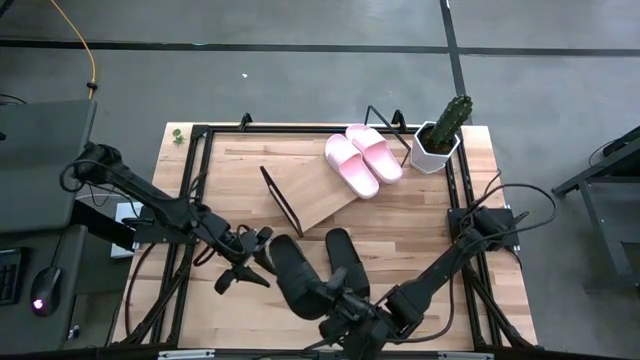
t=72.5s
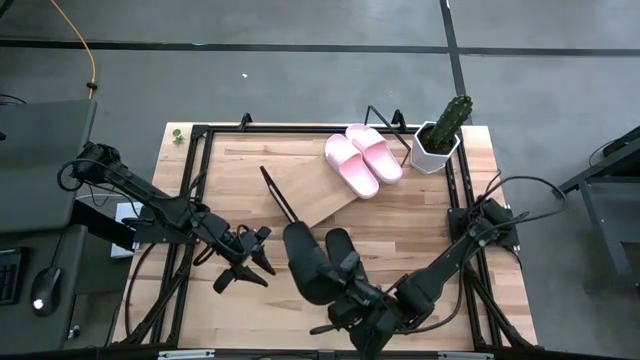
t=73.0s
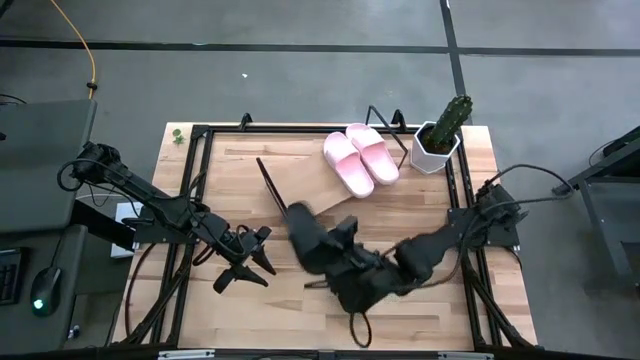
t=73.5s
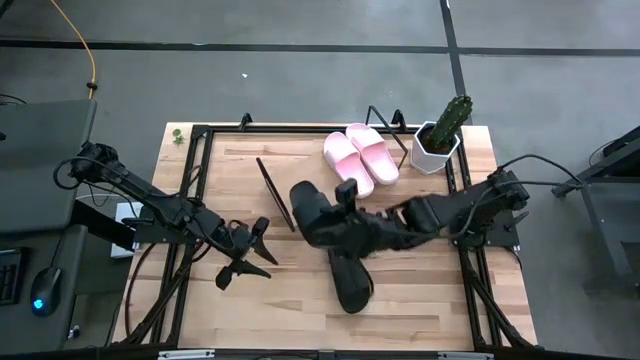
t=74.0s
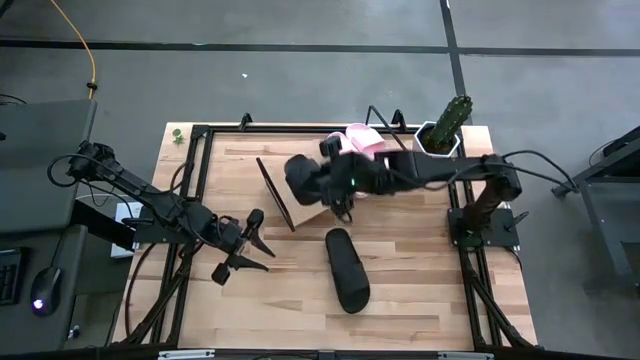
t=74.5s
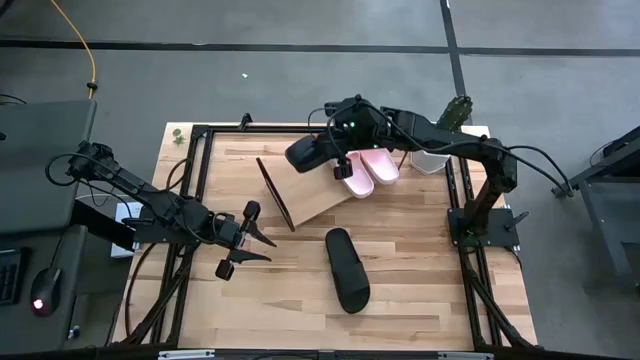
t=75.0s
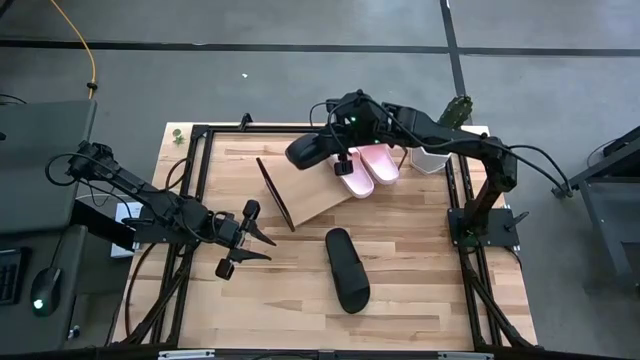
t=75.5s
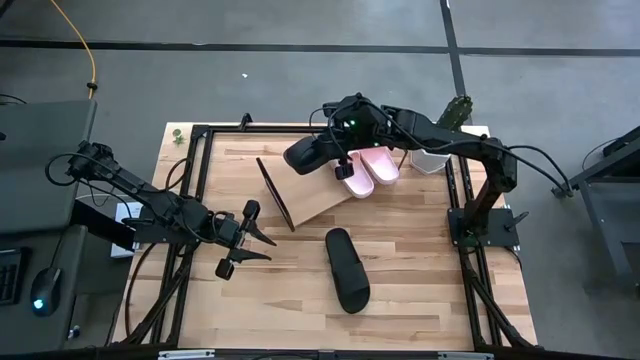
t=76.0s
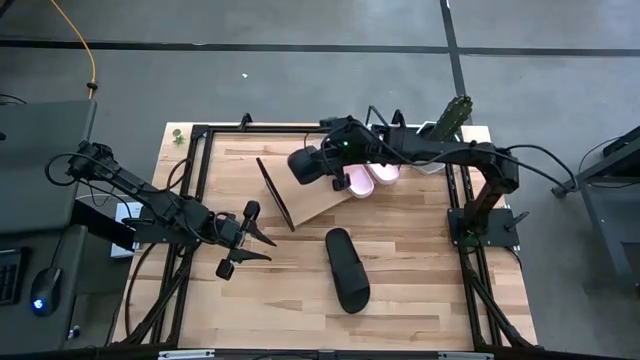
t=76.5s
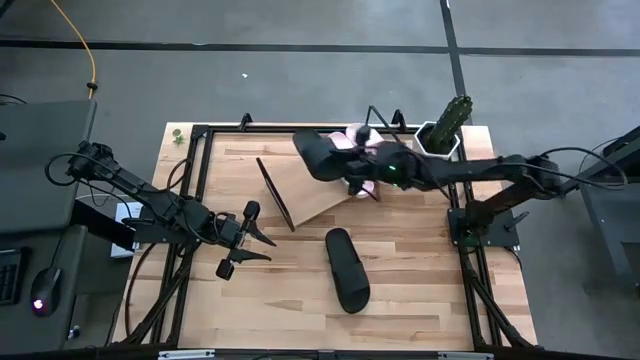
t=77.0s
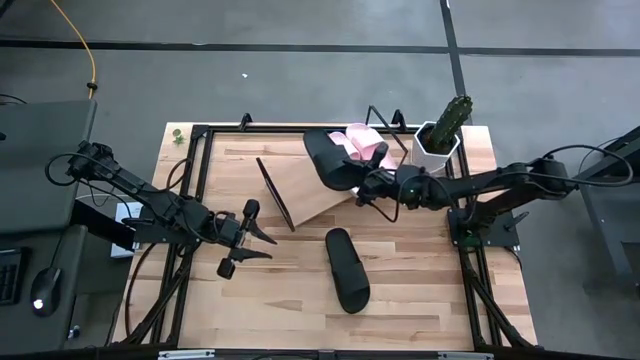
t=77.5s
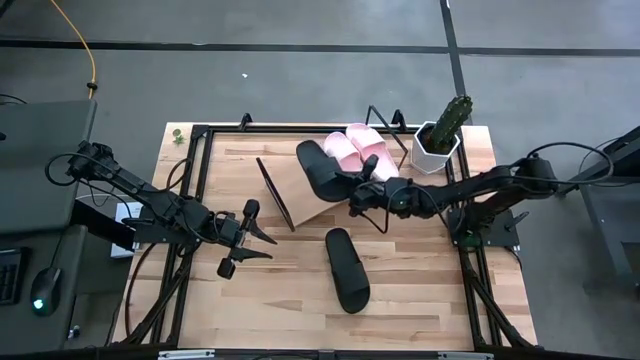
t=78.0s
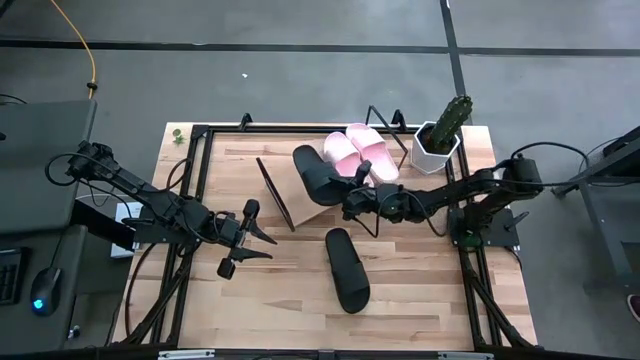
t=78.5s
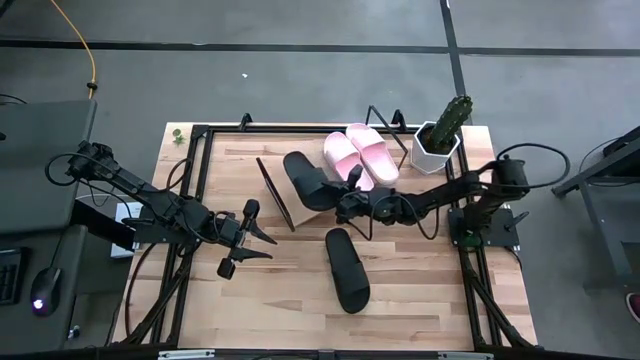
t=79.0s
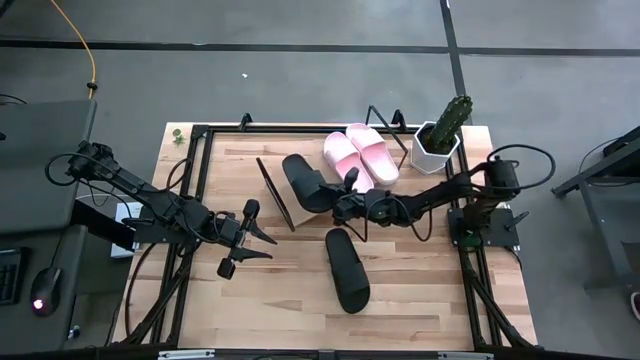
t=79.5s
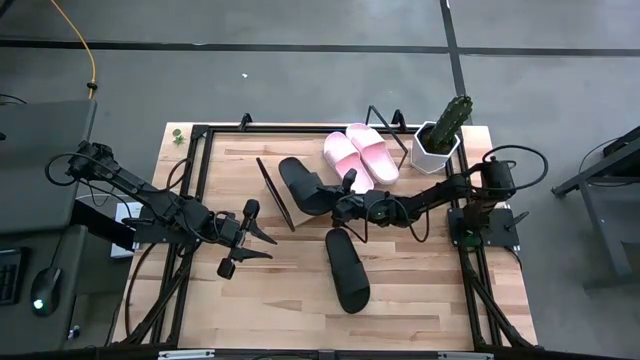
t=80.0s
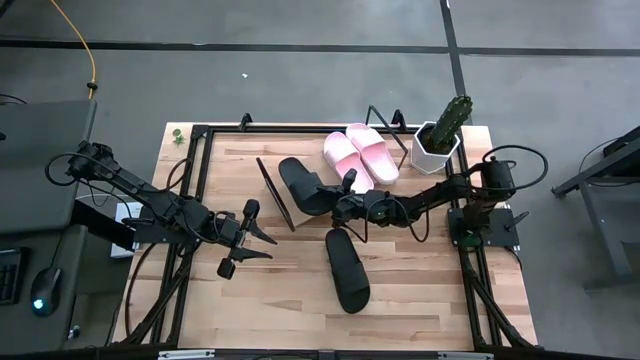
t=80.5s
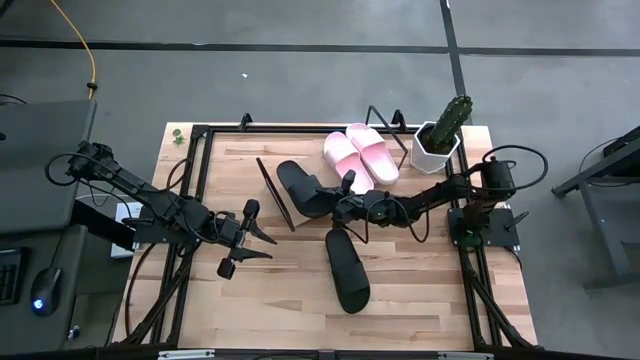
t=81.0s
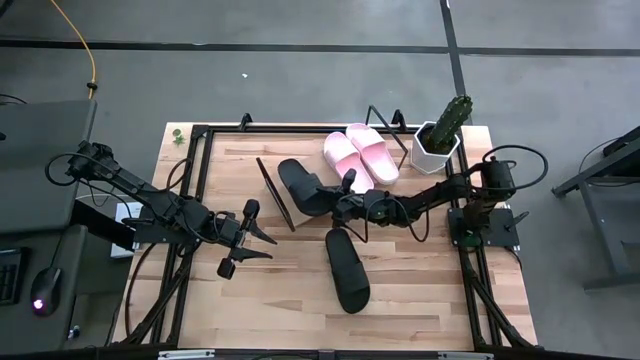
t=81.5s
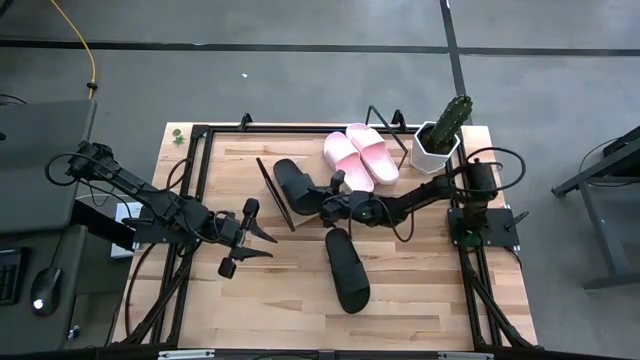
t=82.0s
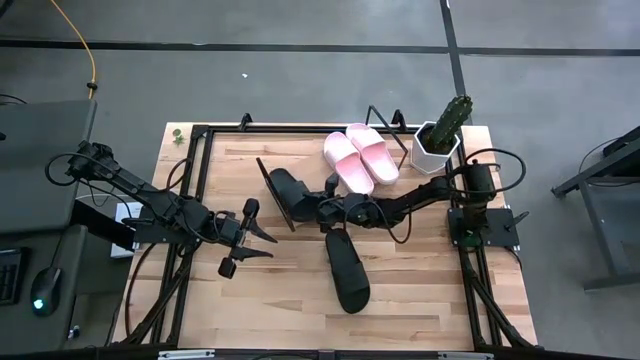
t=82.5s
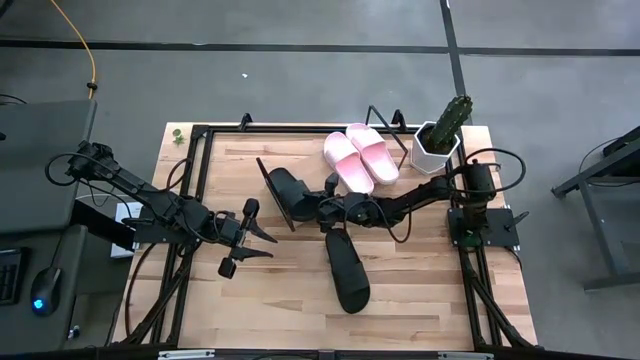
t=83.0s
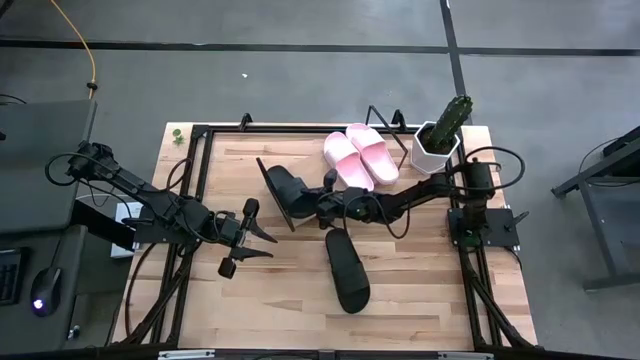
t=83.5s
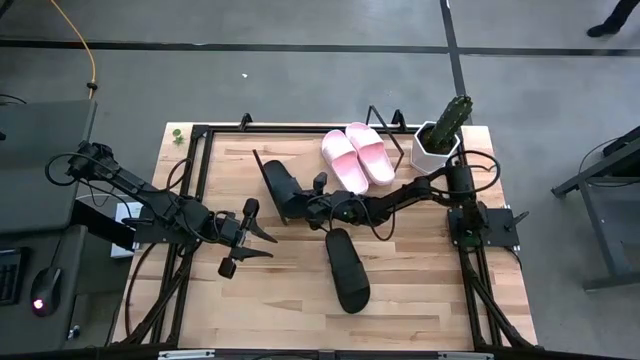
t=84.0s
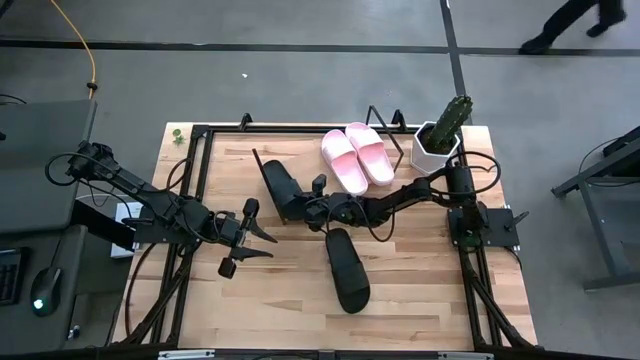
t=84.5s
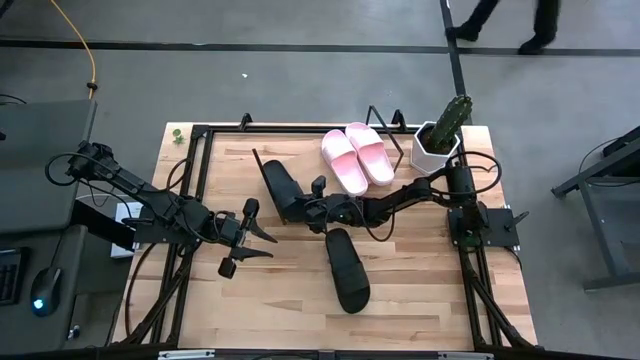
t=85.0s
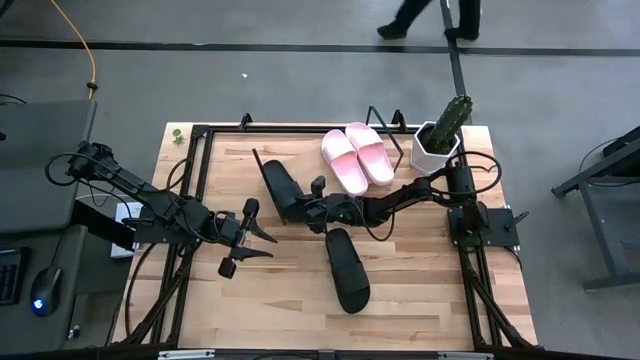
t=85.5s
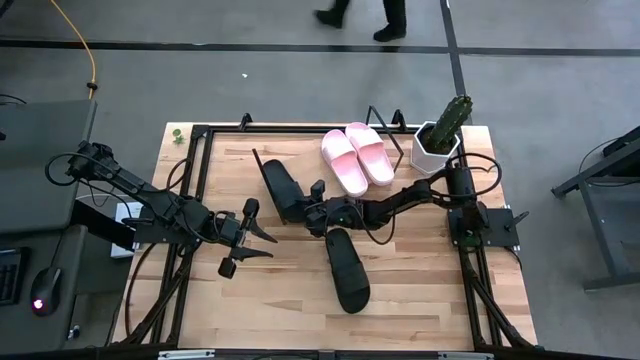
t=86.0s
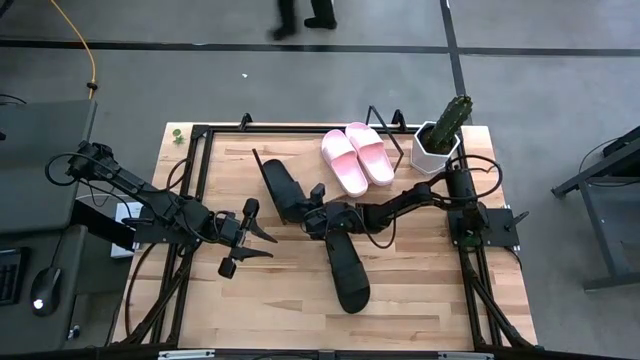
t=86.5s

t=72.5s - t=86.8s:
Task: Pick and place slides into the shelf
Put the left black slide on the shelf

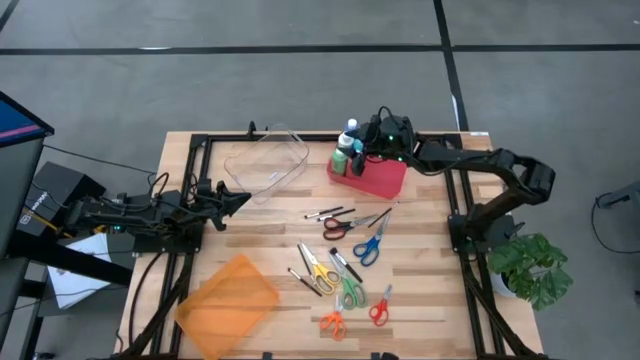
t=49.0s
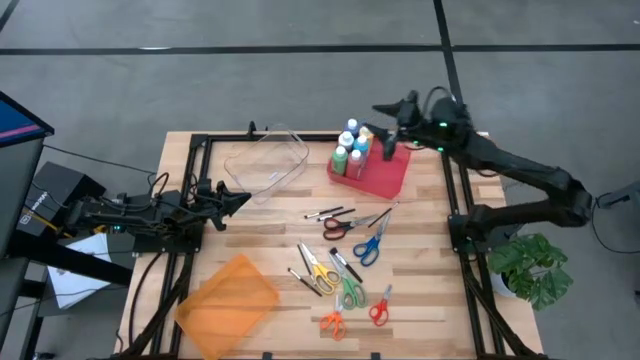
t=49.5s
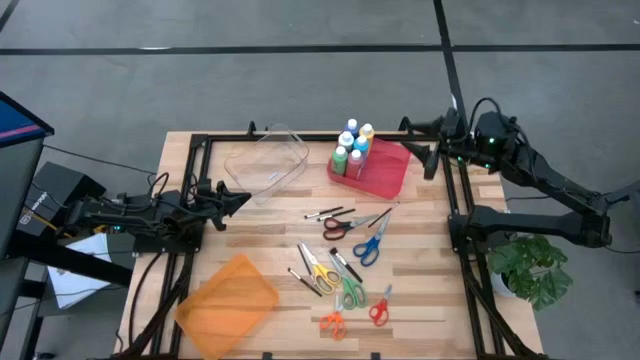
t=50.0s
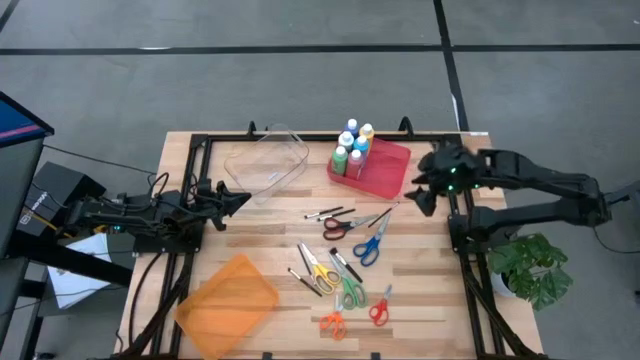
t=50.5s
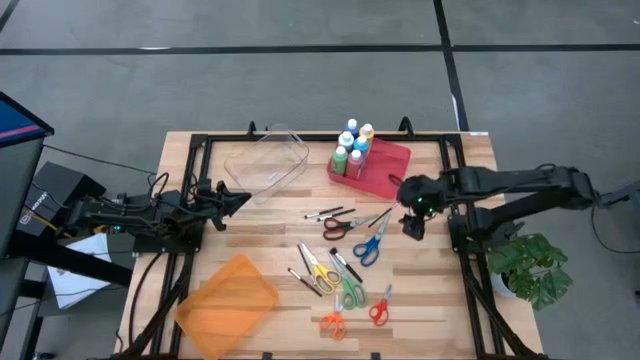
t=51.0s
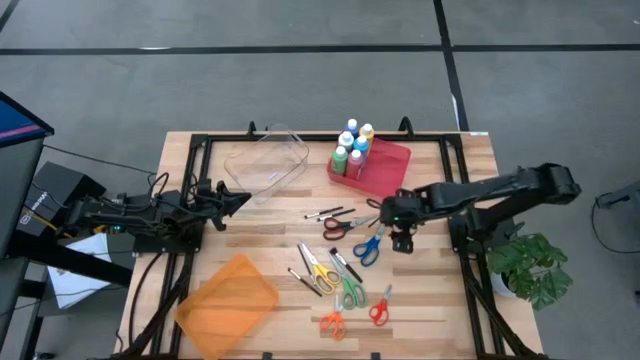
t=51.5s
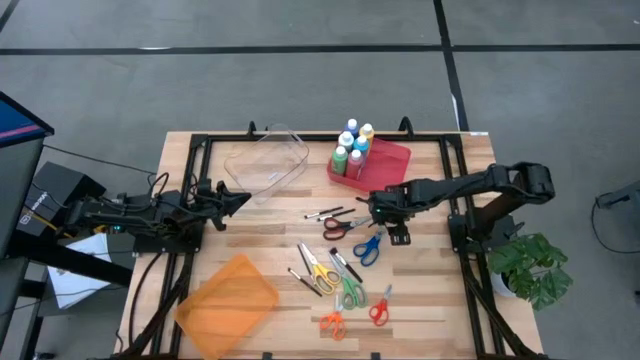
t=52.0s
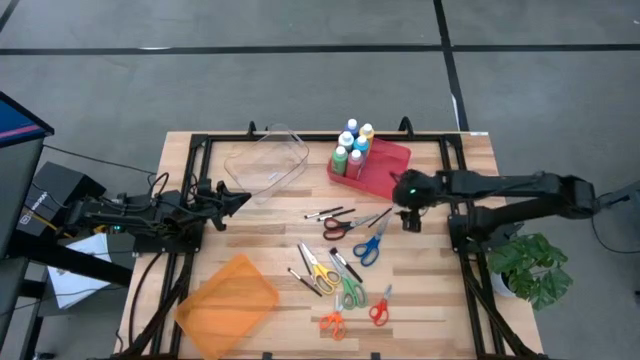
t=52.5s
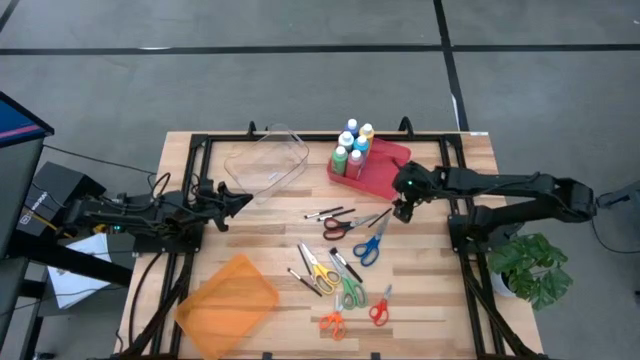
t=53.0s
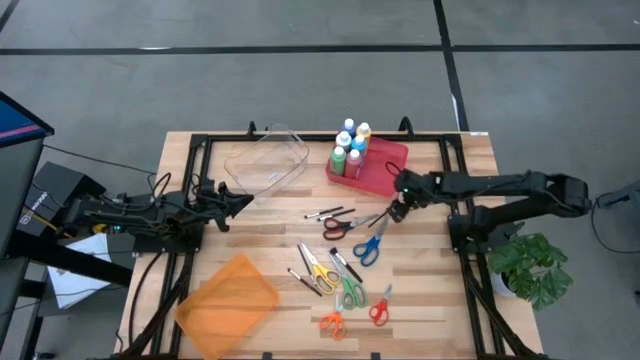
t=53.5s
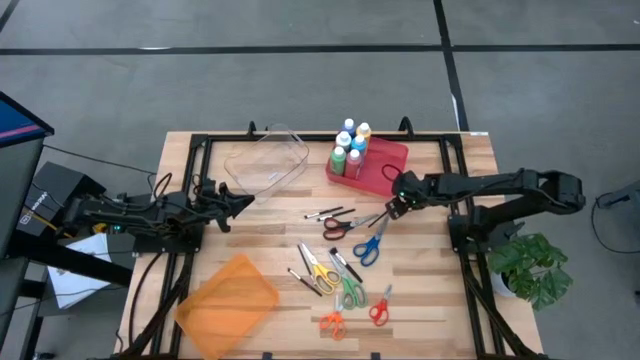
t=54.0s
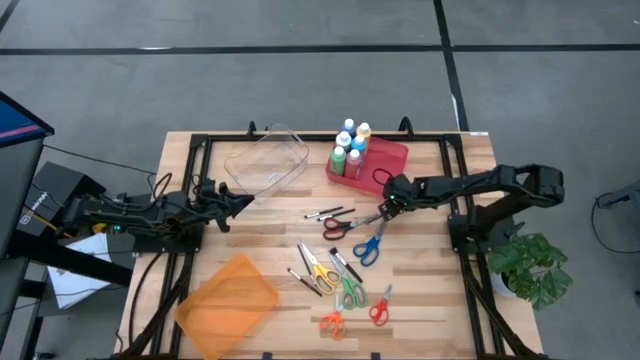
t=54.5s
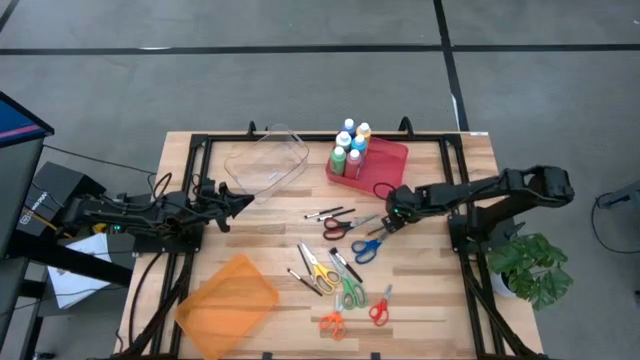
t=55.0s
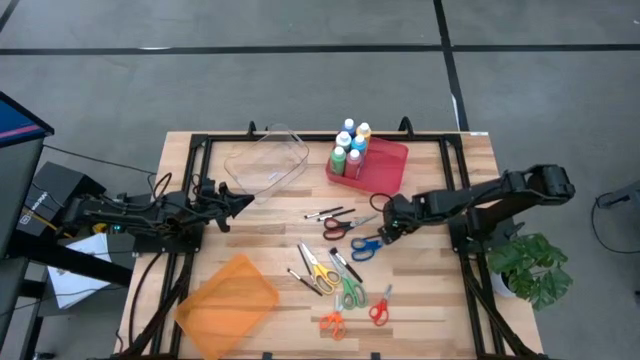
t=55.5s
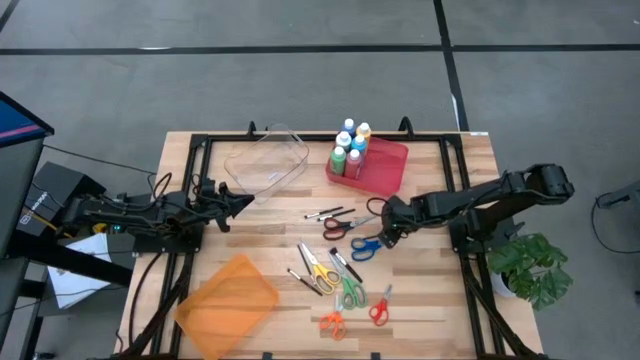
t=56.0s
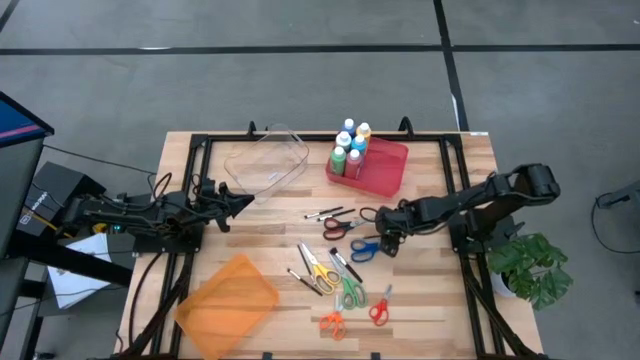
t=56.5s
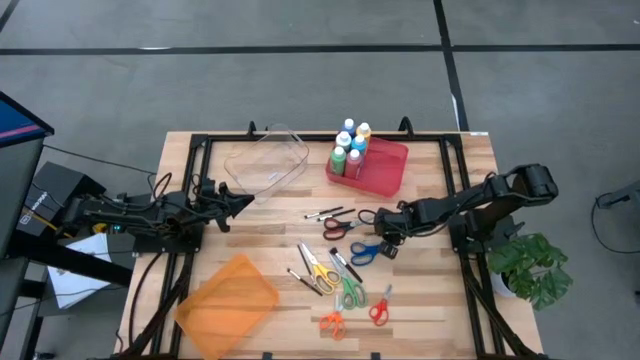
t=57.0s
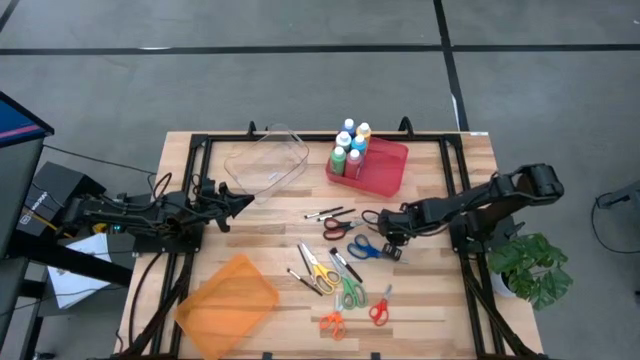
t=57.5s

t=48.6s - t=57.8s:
Task: Pick & Place Paint Supplies
Put the black paint brush into the transparent bin
